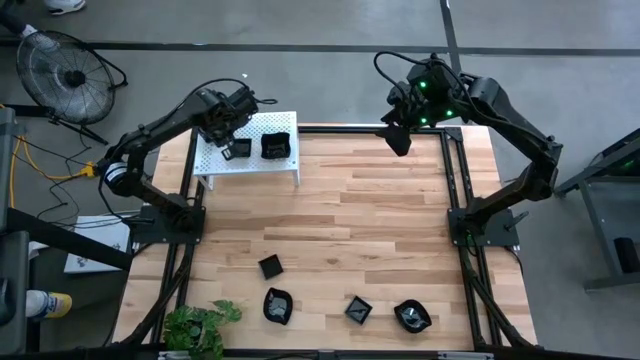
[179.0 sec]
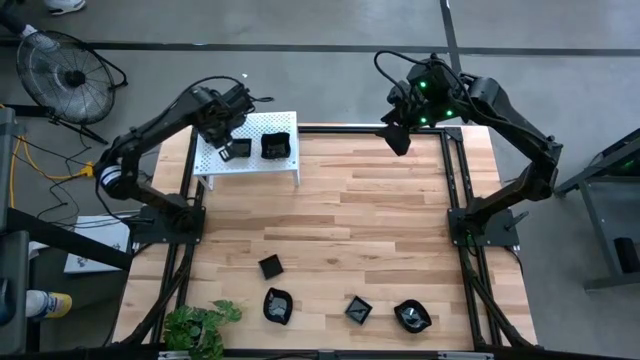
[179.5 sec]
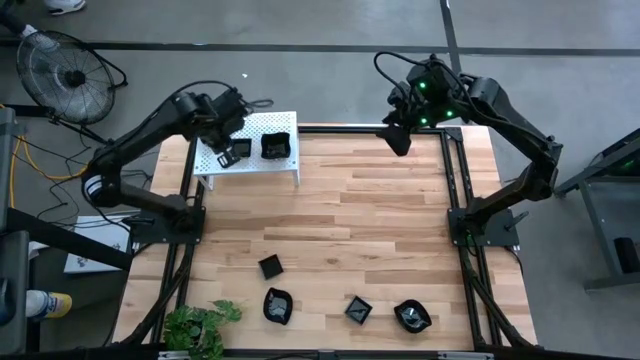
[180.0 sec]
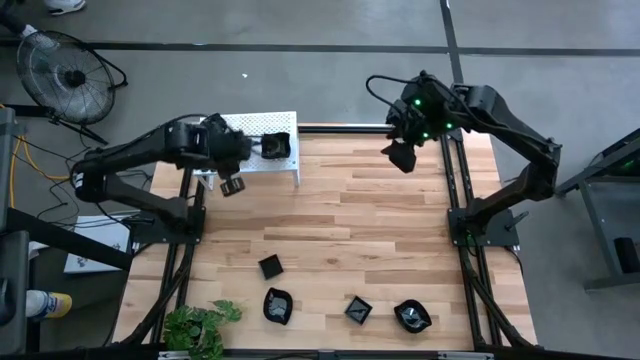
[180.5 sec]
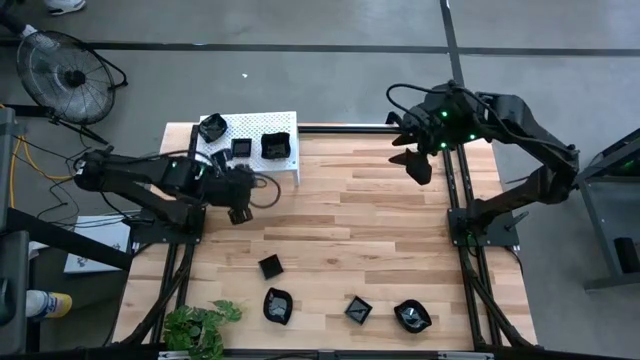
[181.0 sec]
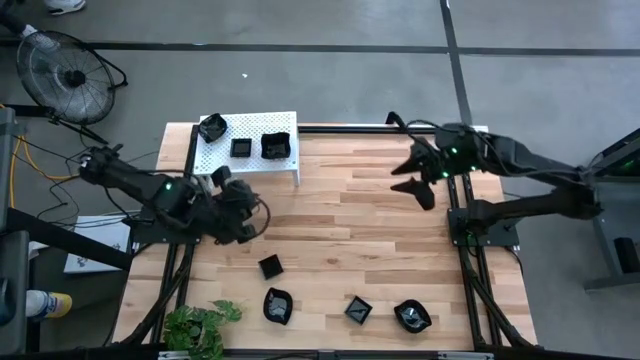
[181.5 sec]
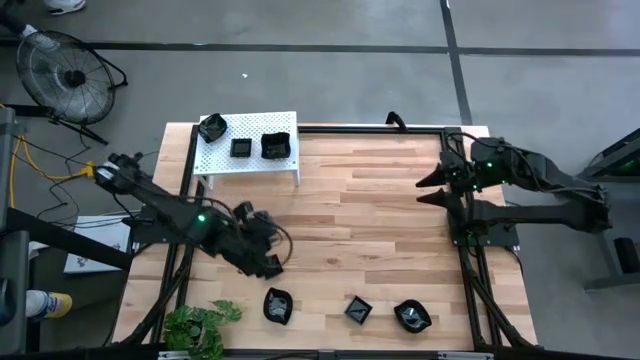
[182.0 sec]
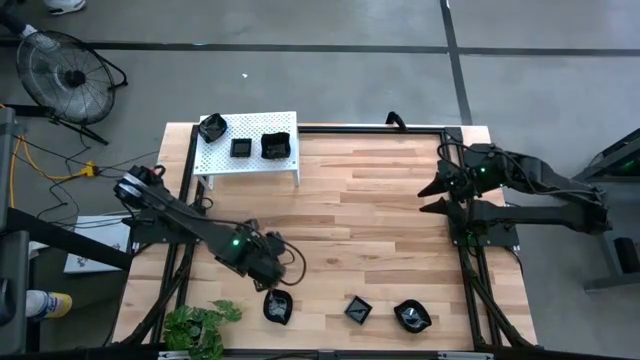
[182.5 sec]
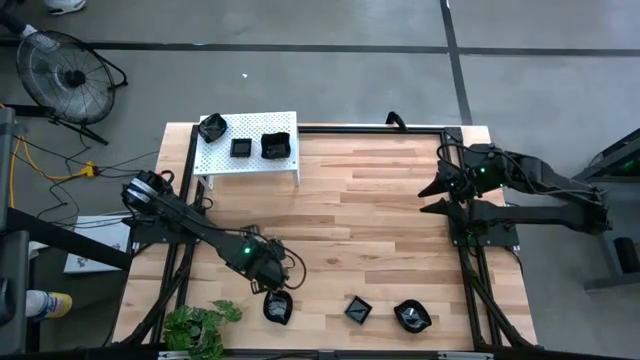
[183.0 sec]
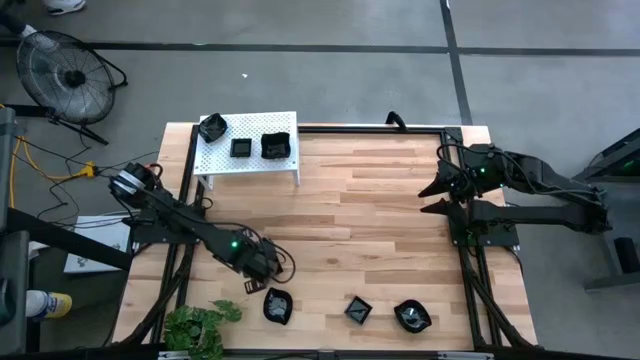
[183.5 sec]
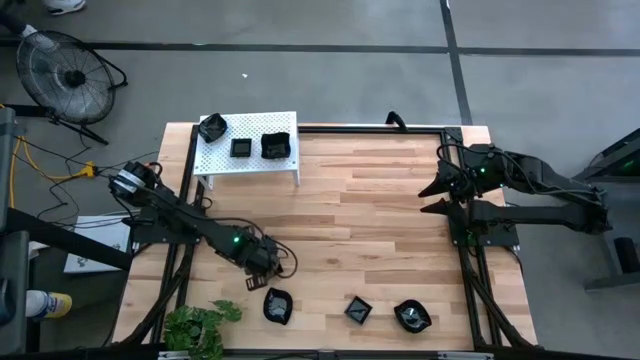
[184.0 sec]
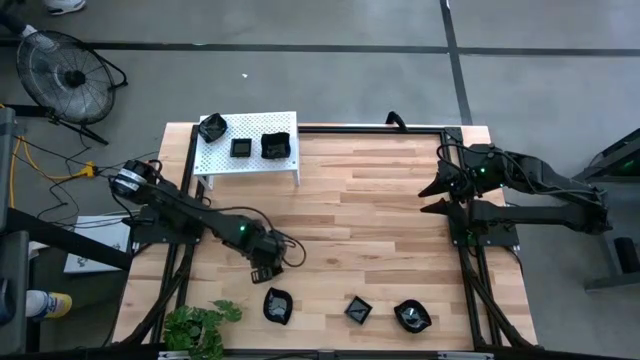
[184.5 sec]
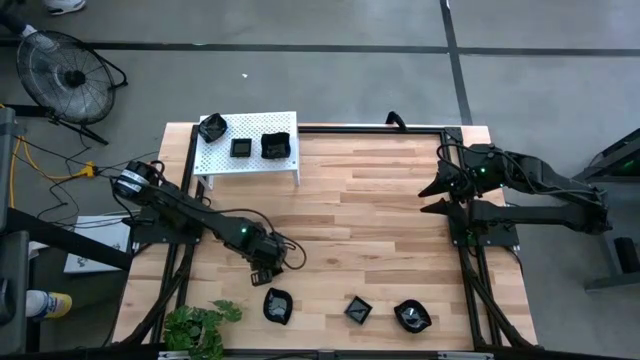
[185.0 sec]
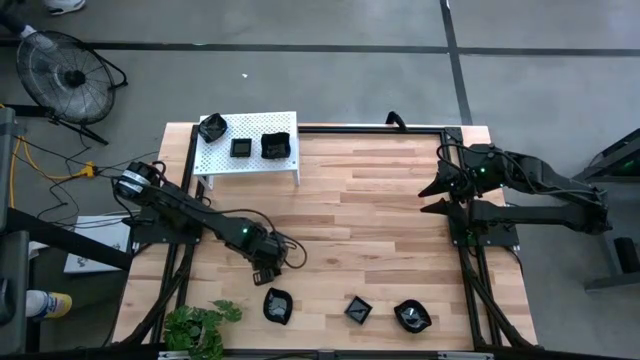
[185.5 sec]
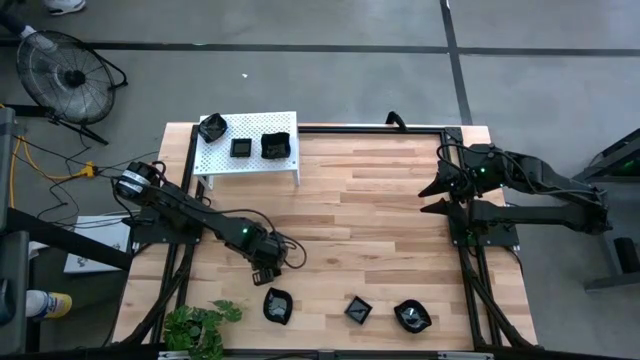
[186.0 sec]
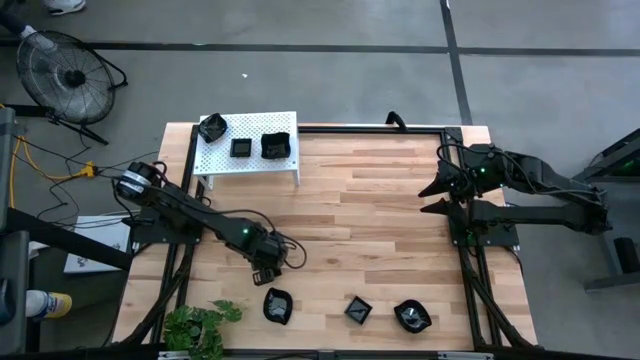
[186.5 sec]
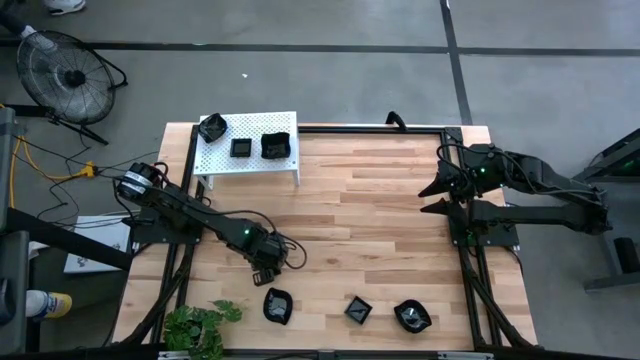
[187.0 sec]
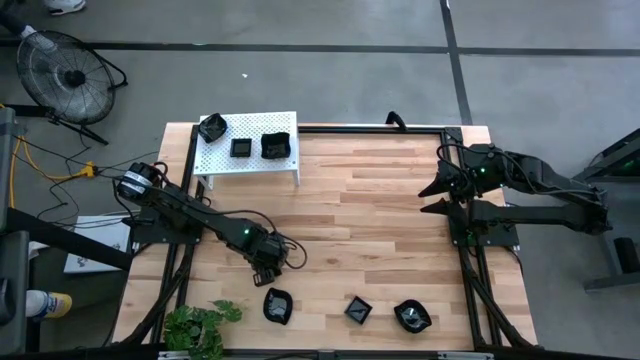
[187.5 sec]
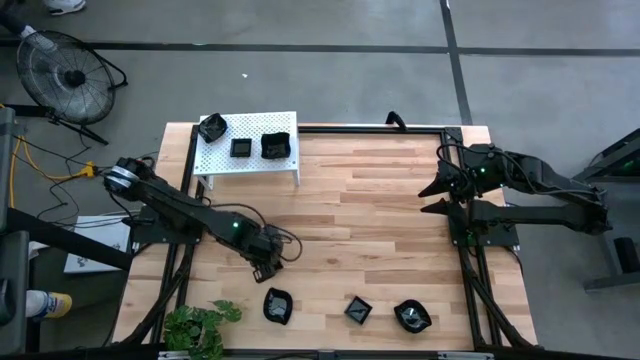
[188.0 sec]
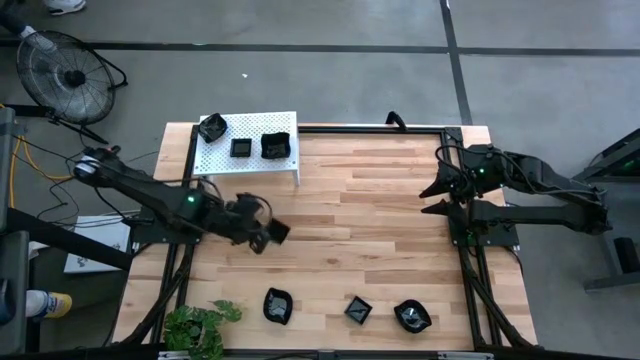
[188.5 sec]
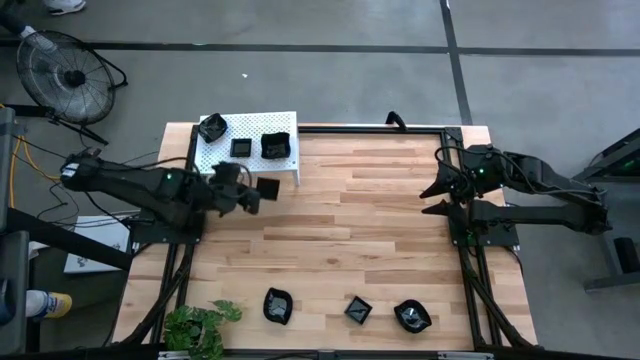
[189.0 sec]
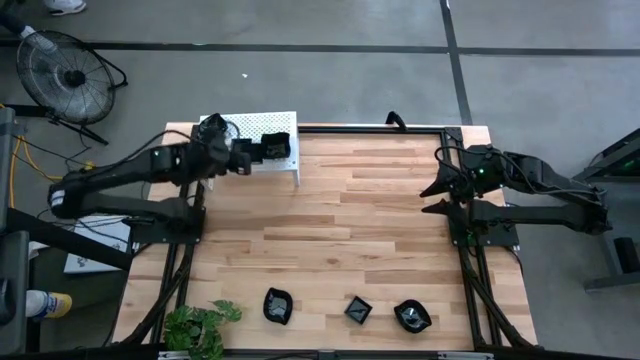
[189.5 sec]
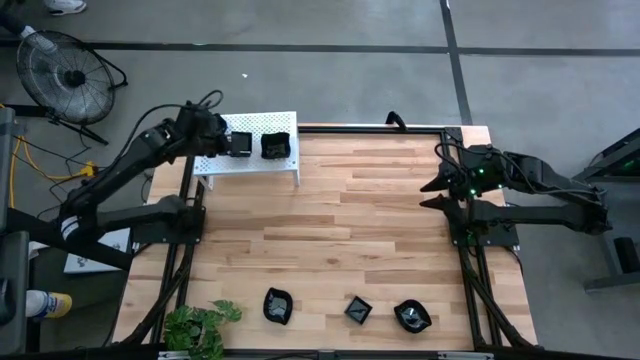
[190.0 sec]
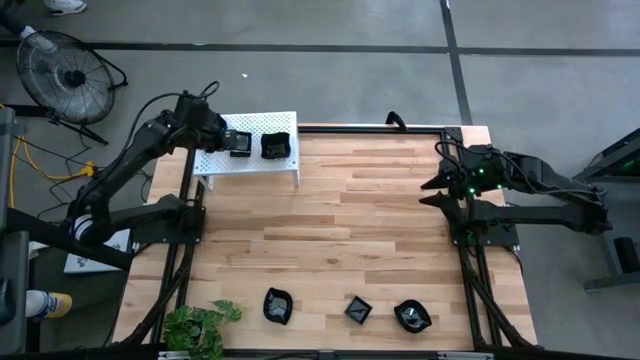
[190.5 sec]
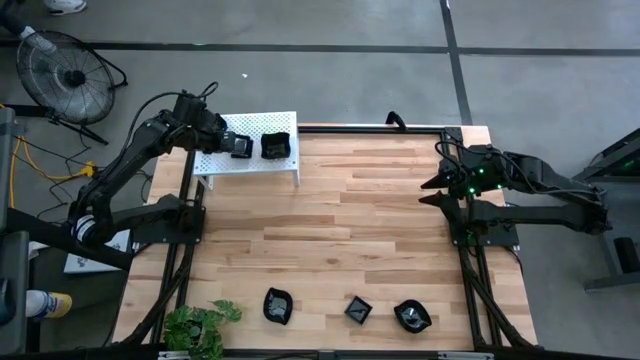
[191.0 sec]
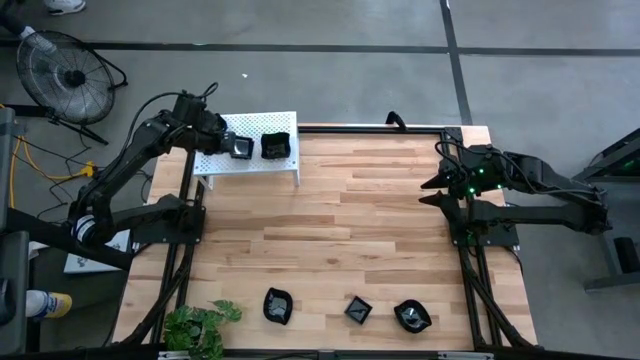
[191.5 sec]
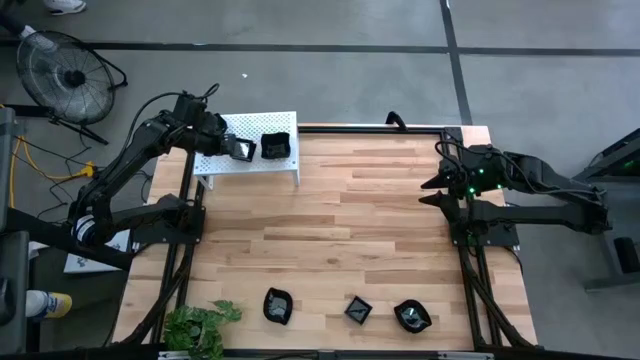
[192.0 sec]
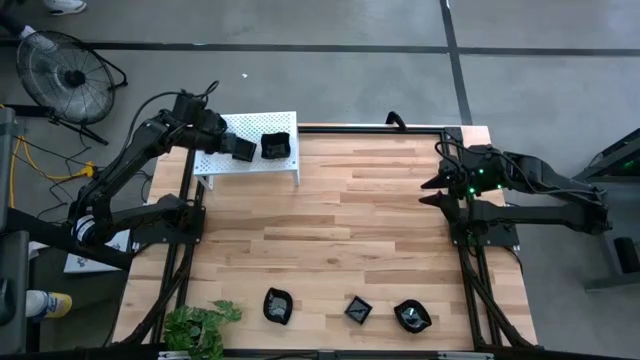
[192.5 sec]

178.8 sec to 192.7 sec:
Task: Pick & Place Mini shaped plates
Stack the black square plate on top of the black square plate on the shelf

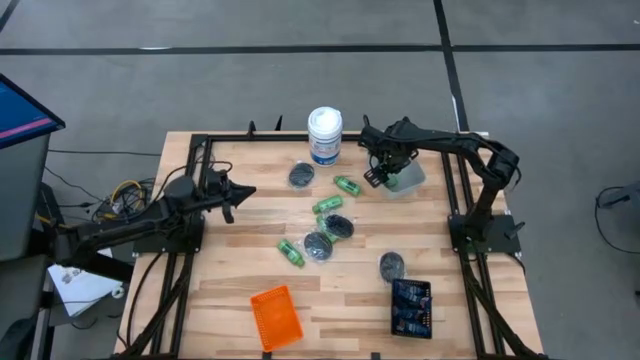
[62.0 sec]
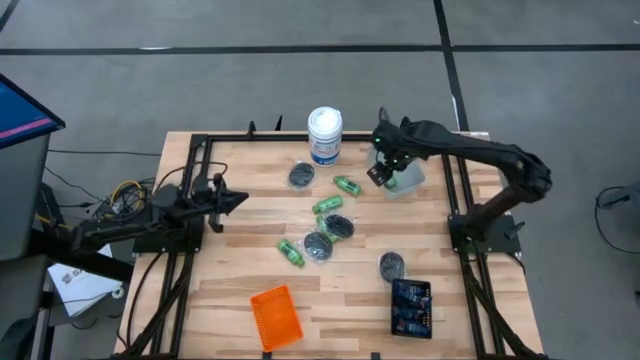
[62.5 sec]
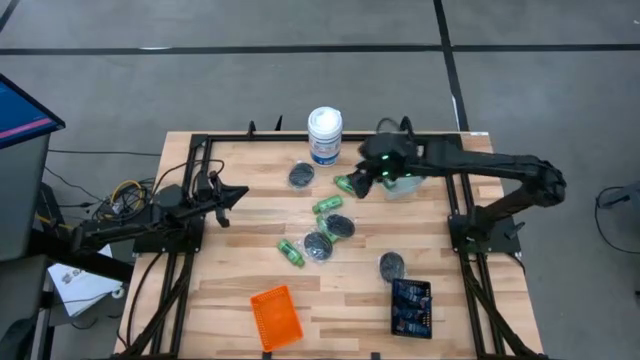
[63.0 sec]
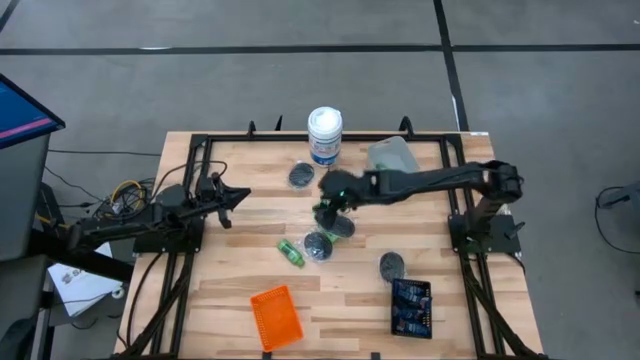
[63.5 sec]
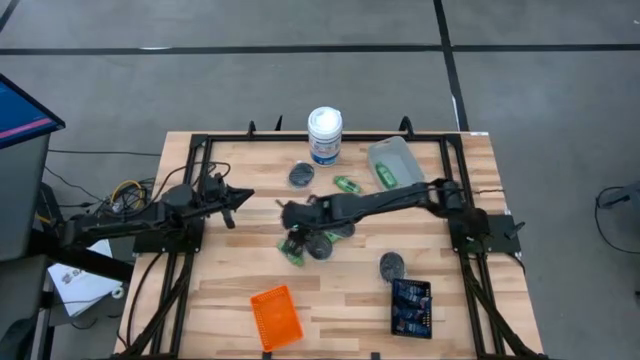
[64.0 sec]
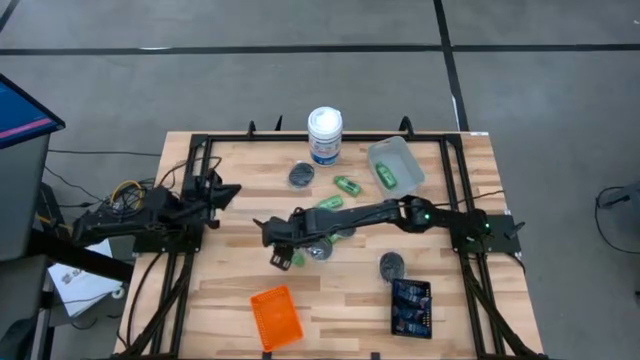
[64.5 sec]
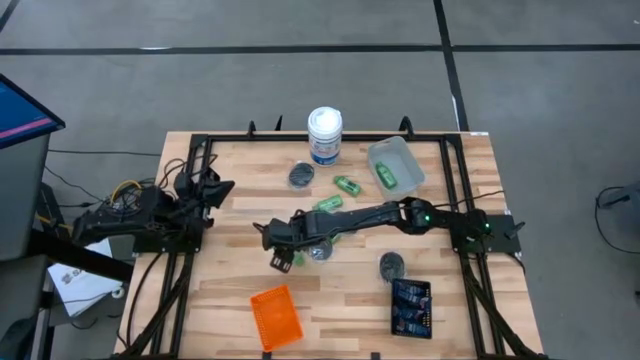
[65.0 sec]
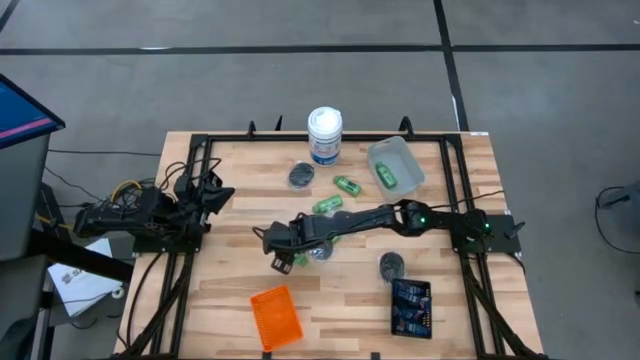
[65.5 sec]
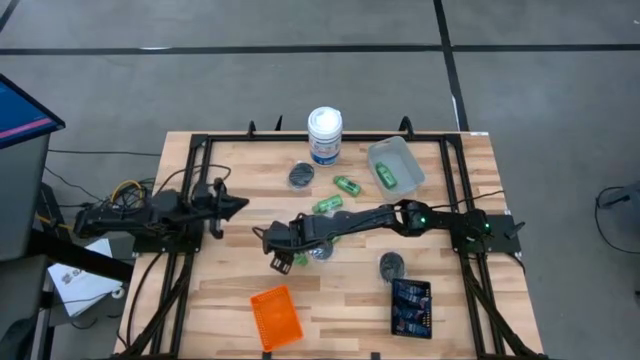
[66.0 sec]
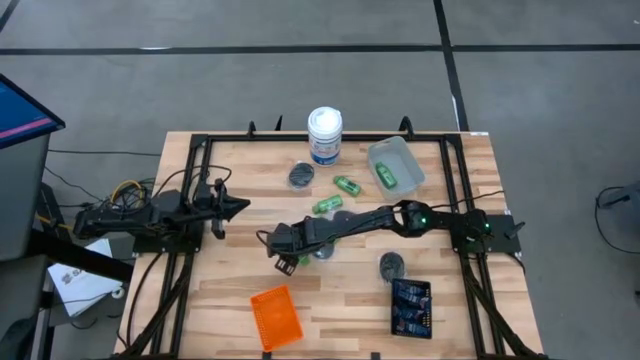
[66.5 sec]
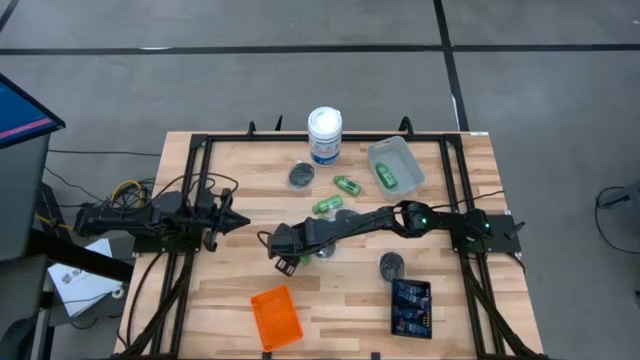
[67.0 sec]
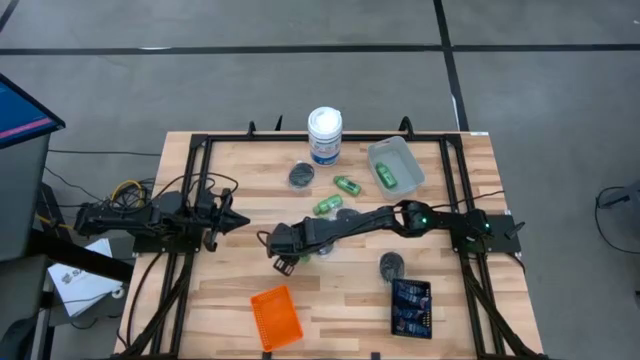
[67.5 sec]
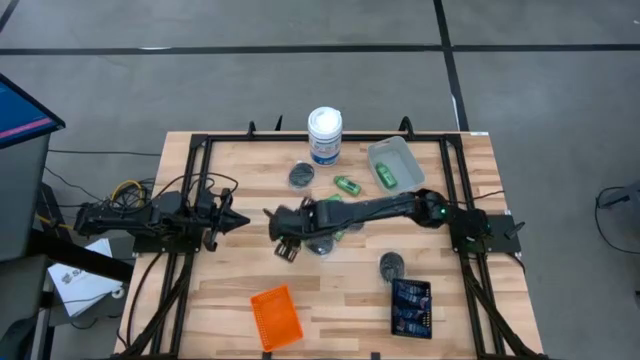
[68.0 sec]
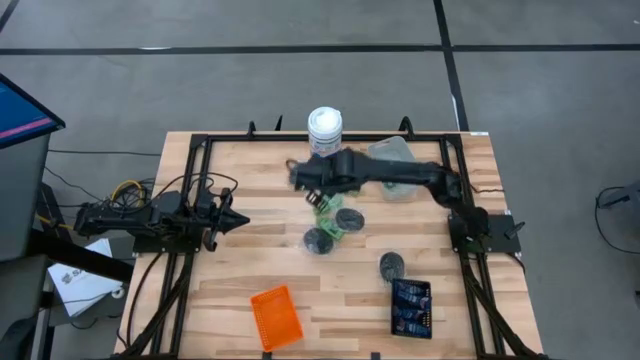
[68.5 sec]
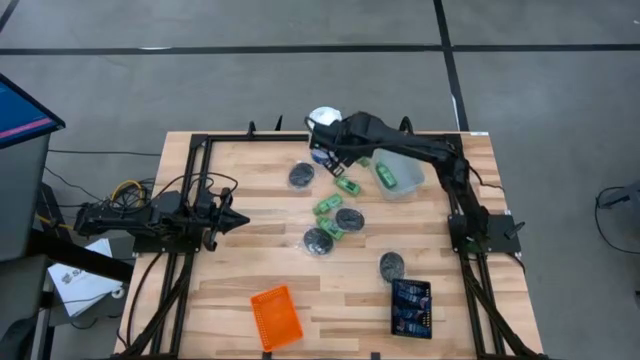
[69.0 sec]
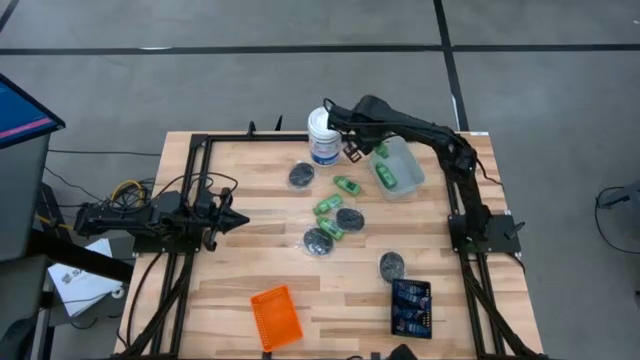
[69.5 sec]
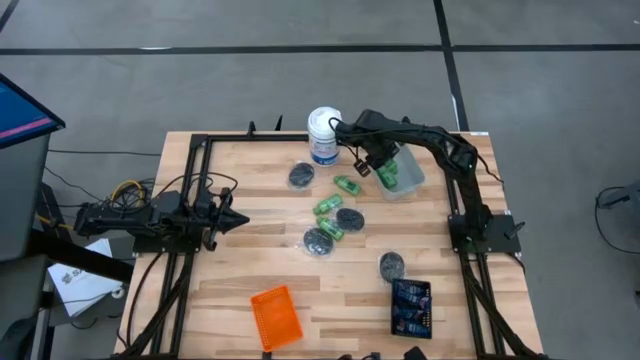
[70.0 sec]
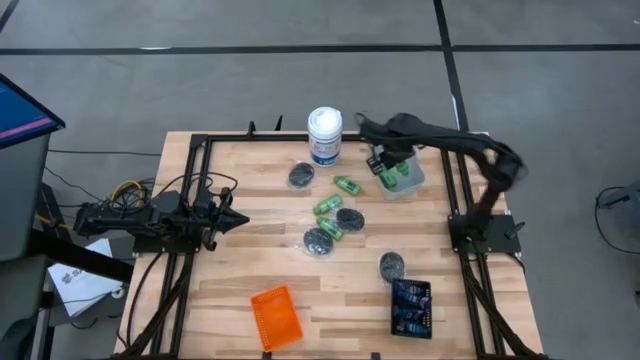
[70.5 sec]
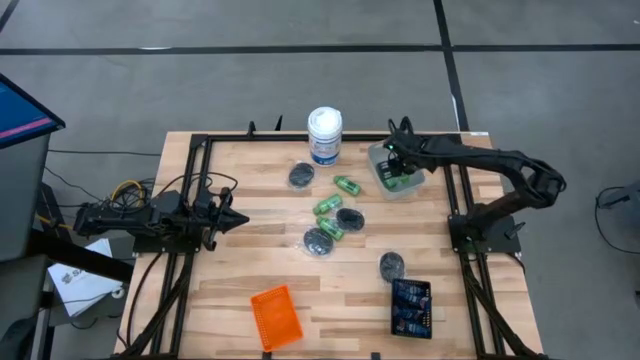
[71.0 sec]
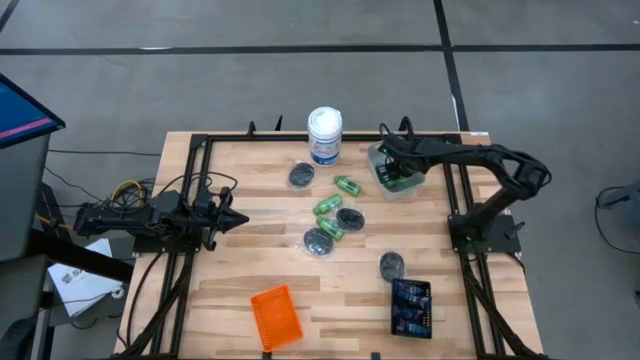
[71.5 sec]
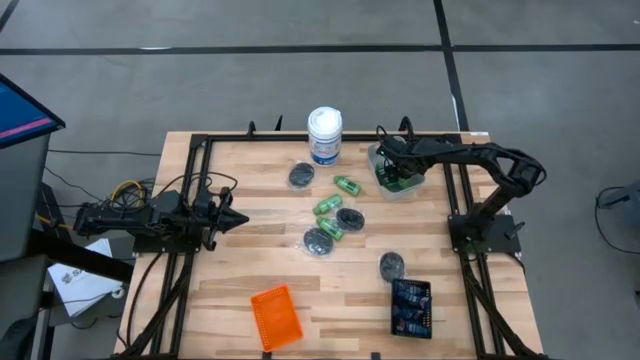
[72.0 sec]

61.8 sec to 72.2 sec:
Task: Pick & Place Travel size toiletries
Put the green shampoo into the gray basket
